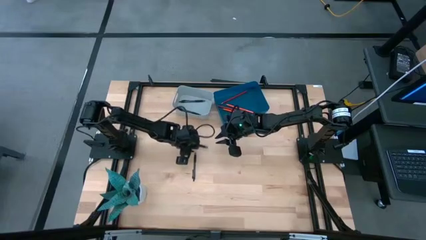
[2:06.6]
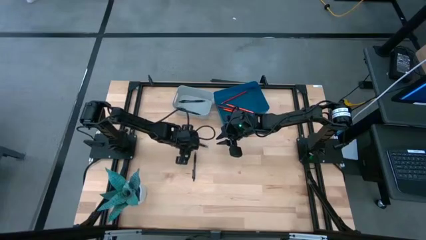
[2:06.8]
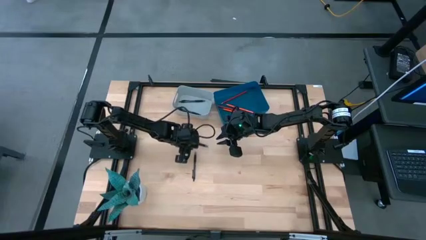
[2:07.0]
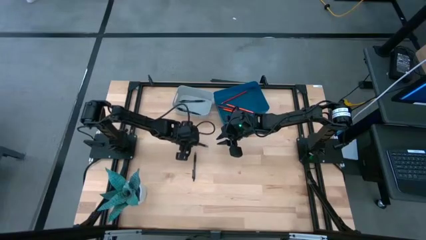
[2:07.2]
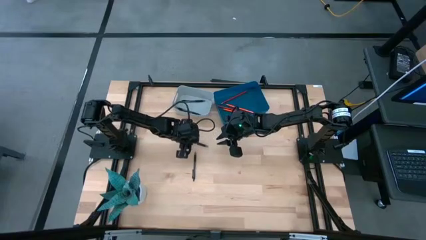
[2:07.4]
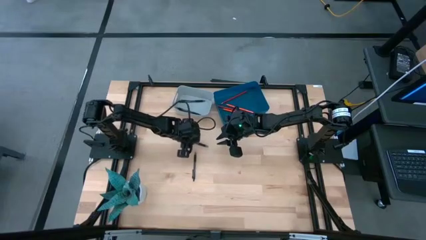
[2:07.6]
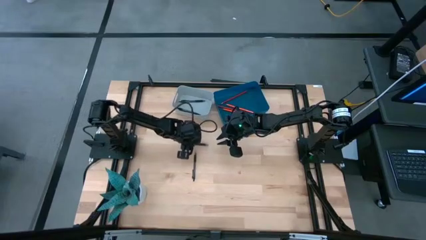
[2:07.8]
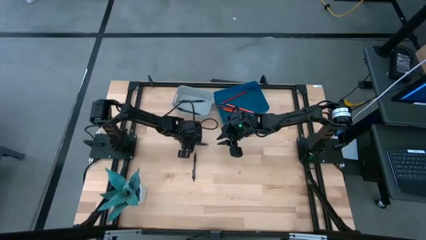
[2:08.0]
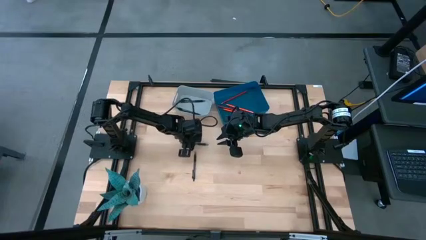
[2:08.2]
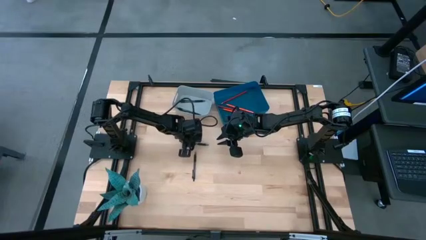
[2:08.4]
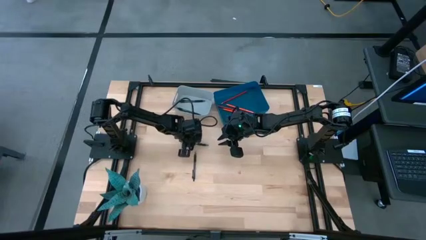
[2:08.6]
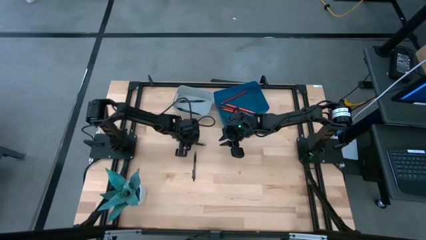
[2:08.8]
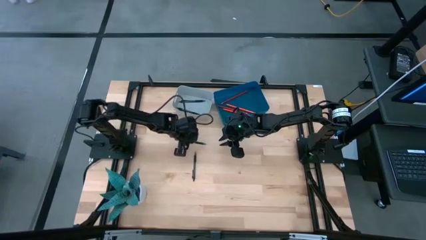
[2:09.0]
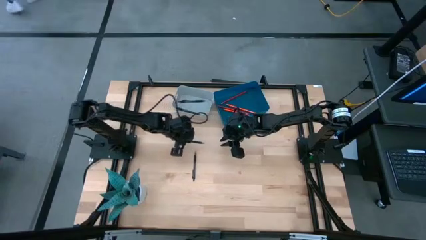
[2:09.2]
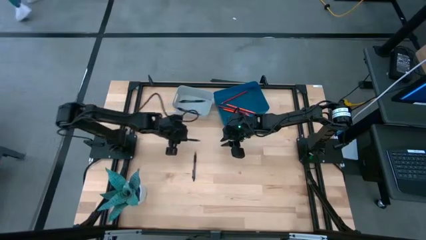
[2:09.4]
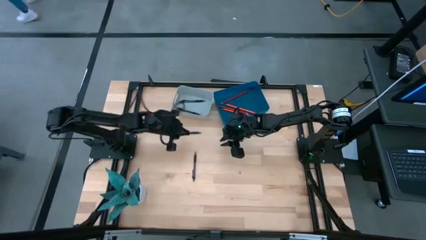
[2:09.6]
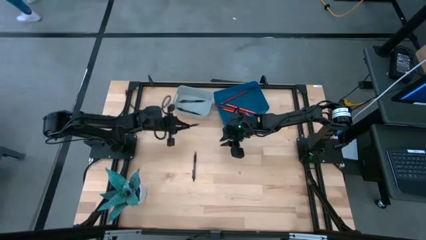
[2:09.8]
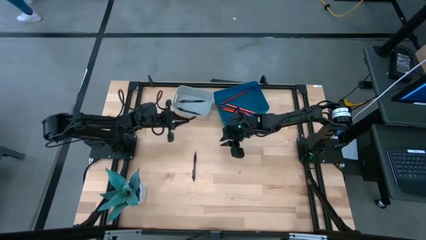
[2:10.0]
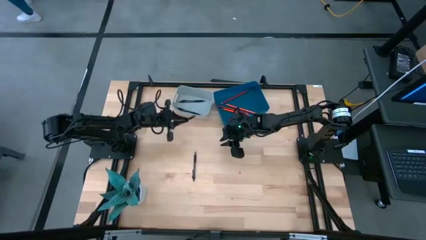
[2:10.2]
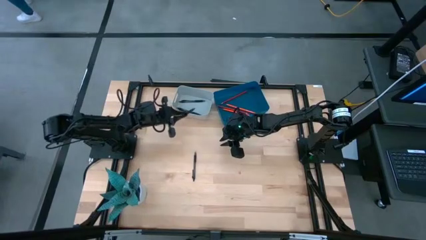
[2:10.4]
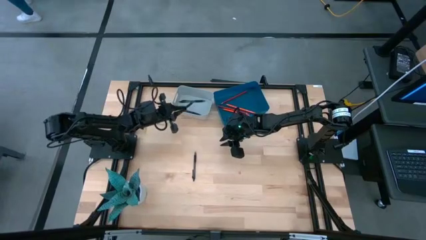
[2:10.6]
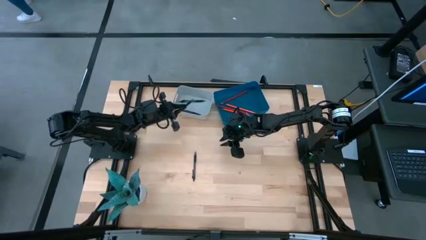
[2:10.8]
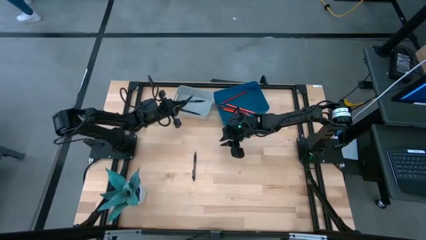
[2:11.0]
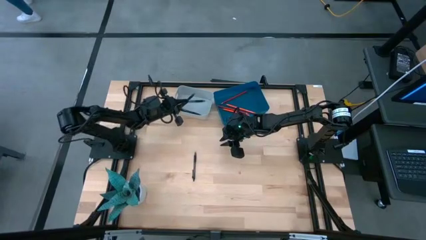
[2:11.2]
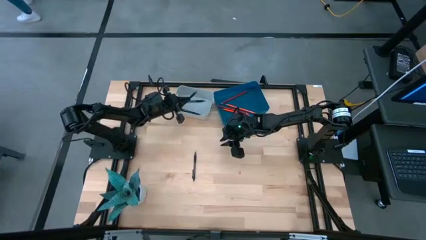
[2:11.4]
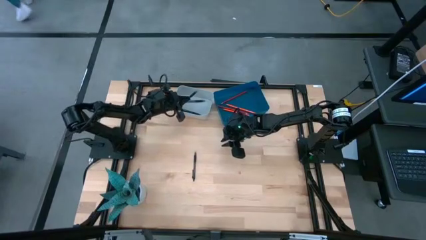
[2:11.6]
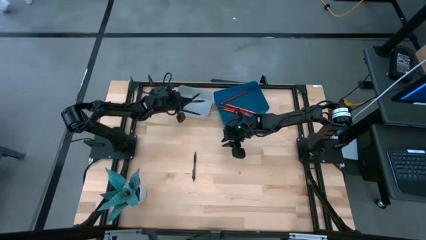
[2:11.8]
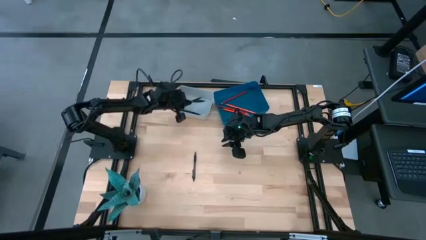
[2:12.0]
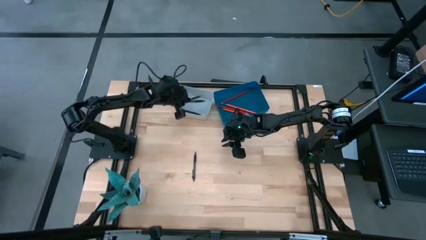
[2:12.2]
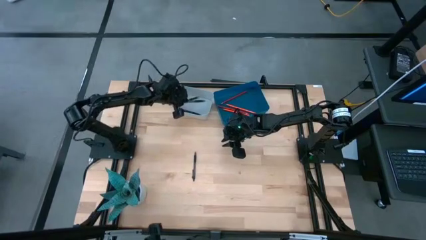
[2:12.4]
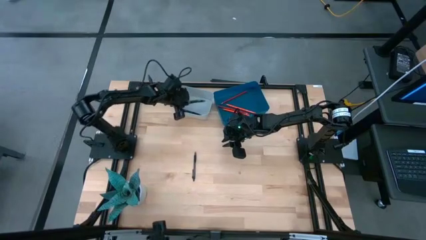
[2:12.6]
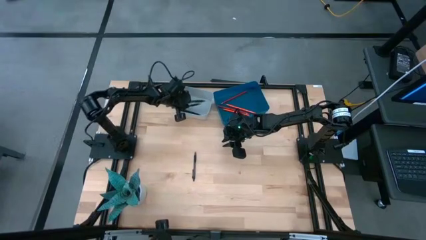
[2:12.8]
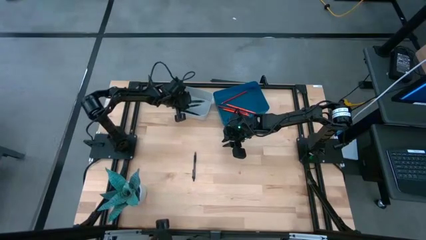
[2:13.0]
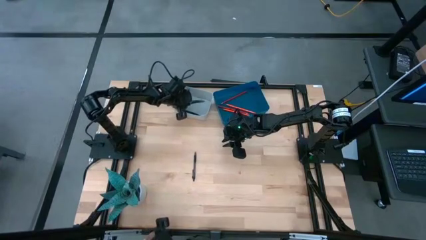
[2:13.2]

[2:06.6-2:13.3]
Task: Sort pens & pencils
Put the black pen into the gray bin

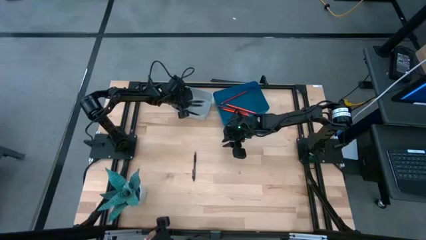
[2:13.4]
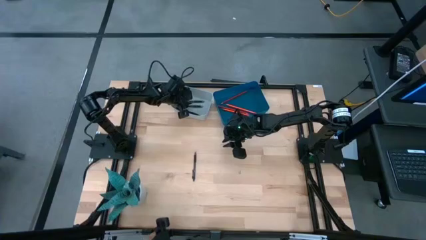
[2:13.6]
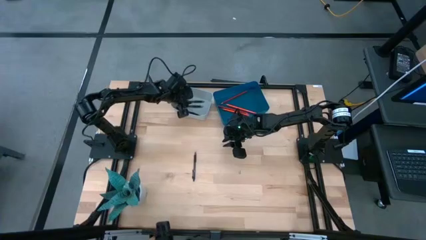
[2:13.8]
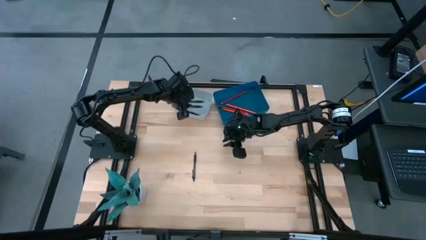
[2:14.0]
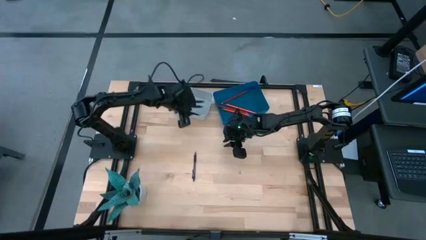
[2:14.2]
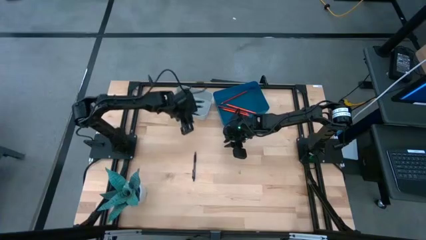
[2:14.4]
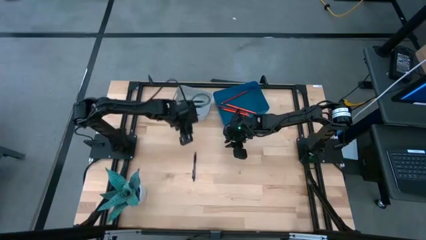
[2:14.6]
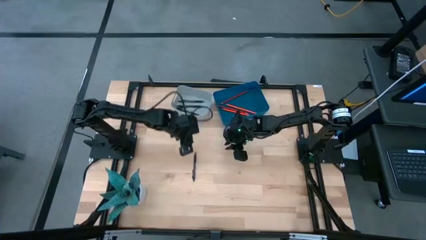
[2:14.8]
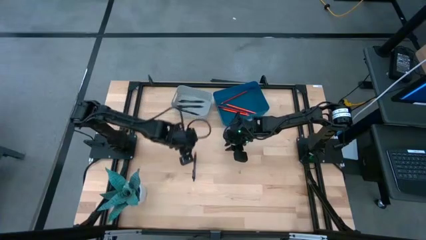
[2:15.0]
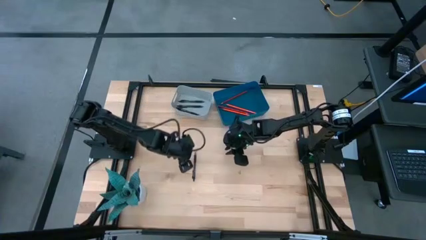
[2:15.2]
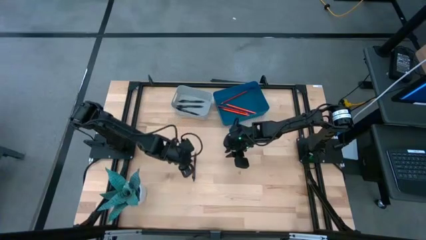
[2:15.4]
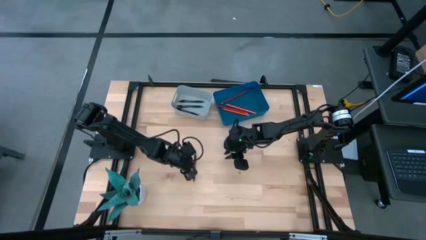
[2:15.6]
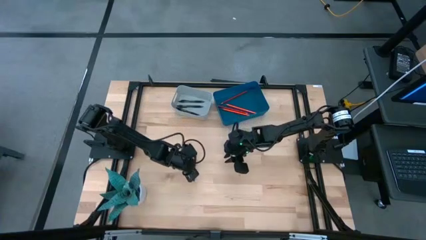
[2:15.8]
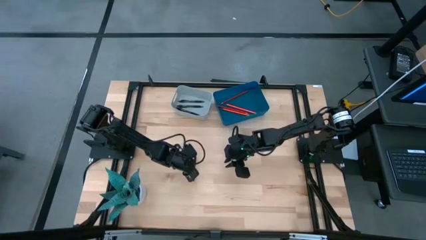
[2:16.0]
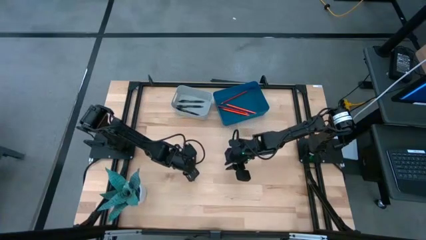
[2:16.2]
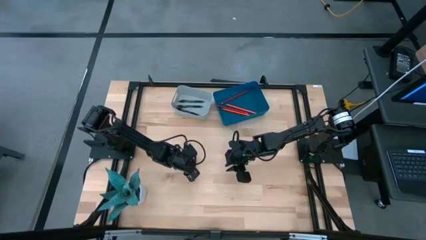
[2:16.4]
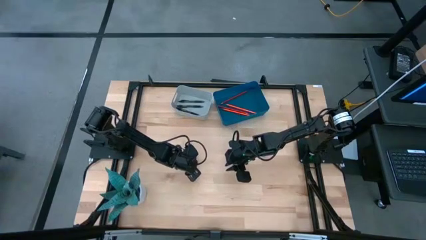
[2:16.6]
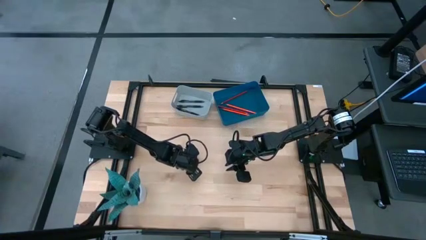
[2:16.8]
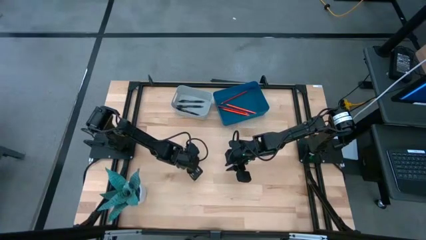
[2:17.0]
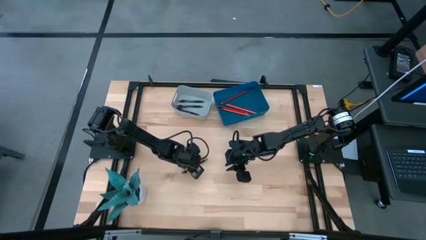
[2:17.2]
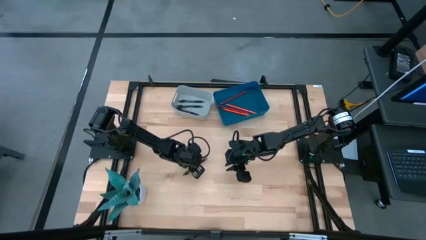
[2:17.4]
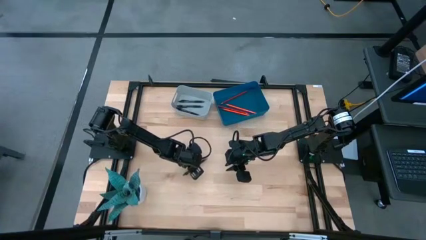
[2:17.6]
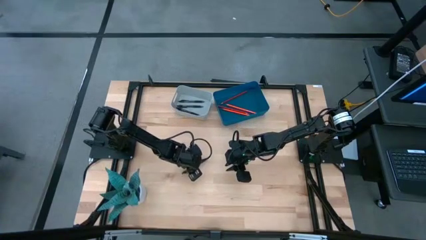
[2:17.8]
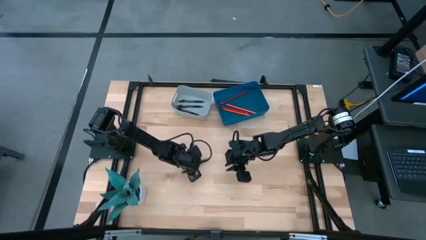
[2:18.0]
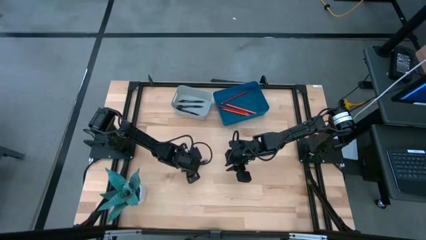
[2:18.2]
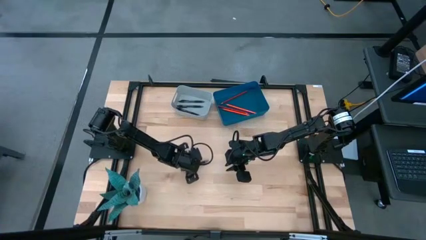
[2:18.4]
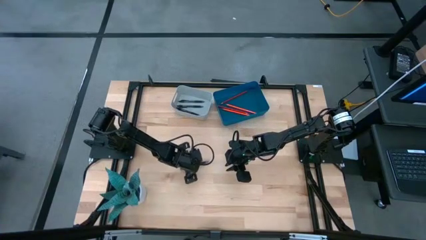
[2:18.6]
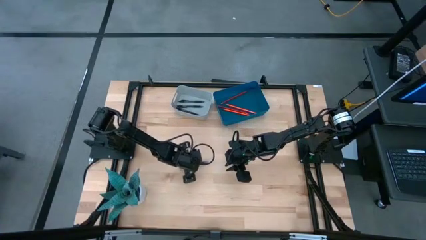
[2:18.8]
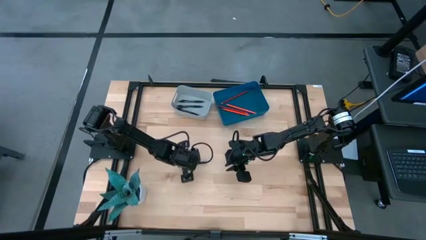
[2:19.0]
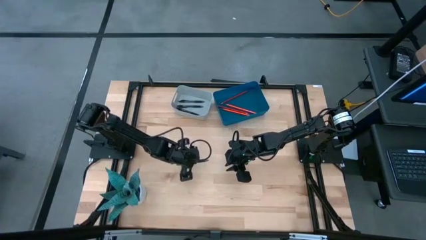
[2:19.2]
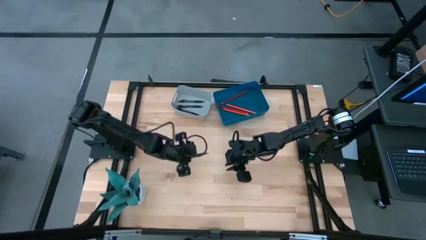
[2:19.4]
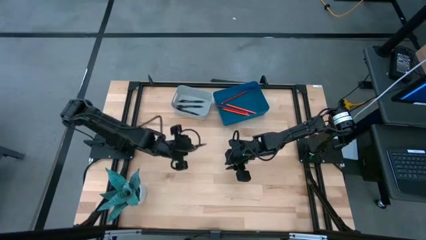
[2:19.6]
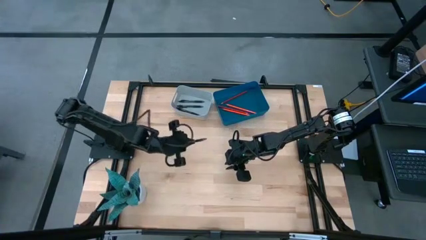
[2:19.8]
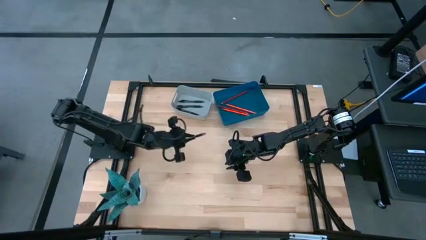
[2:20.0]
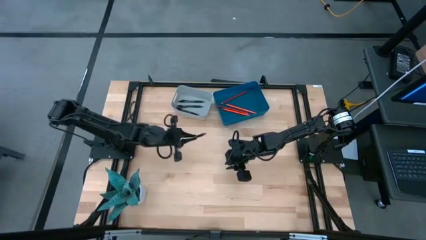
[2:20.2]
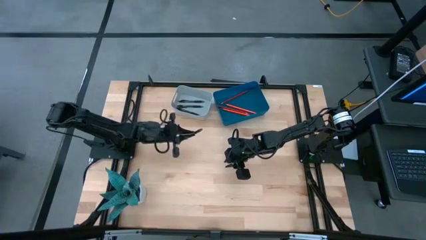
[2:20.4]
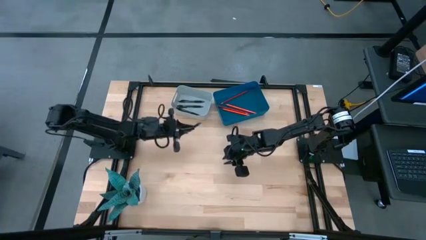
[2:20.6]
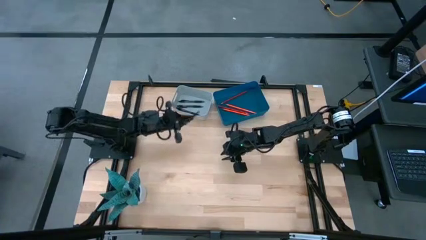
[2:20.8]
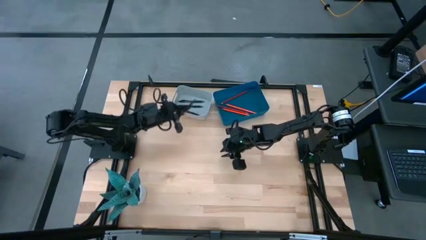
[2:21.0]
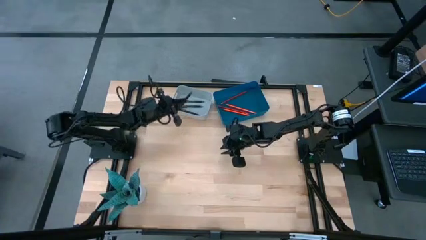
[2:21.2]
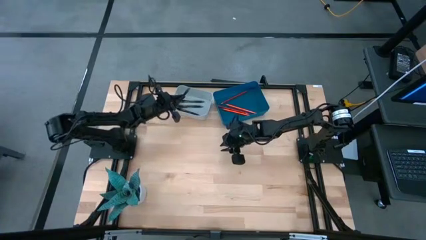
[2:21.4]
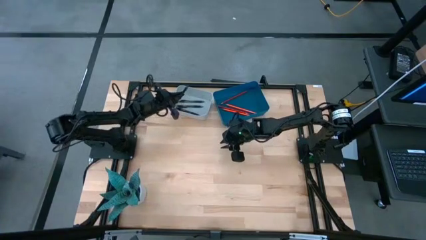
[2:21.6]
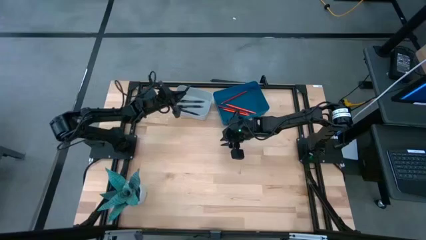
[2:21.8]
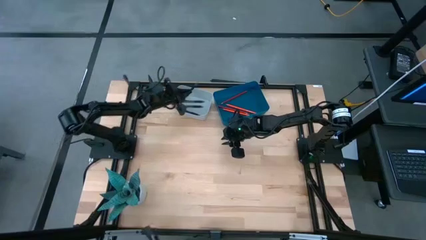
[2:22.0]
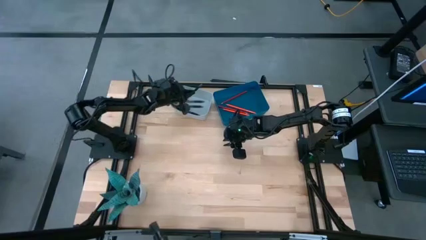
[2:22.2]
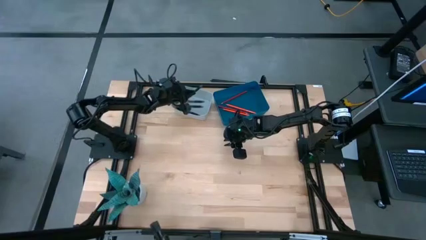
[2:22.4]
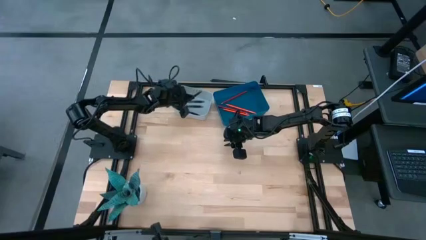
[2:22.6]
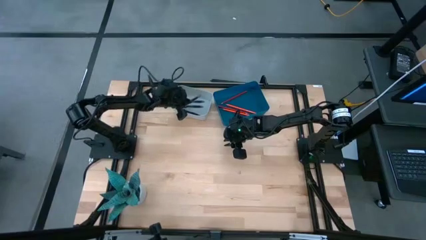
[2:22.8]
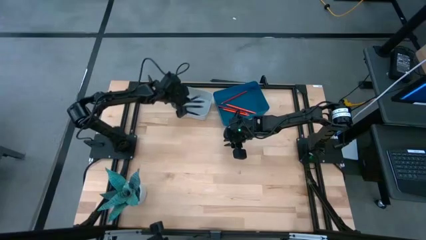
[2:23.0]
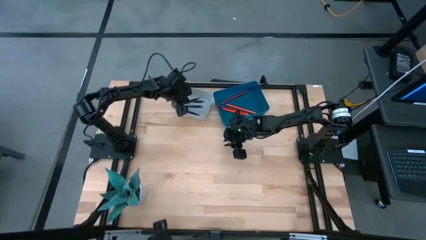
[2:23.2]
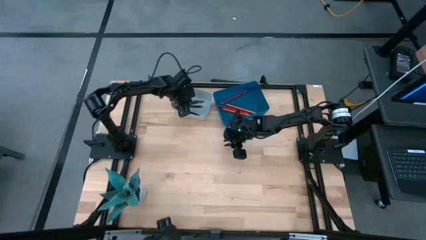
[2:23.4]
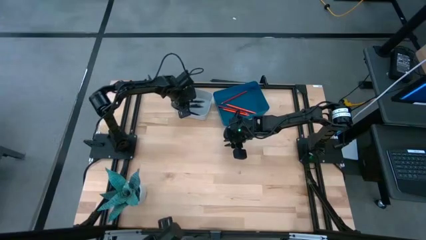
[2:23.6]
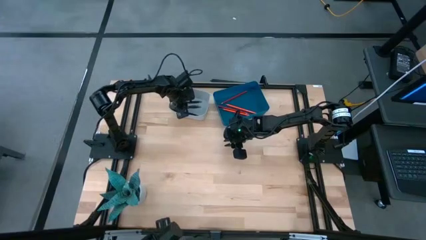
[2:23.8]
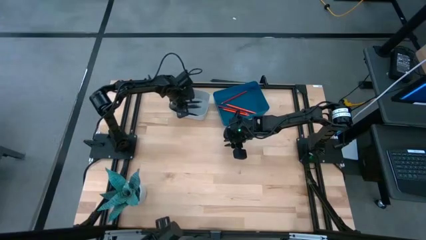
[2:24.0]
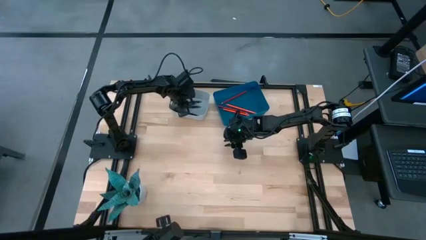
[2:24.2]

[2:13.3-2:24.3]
Put the black pen into the gray bin
